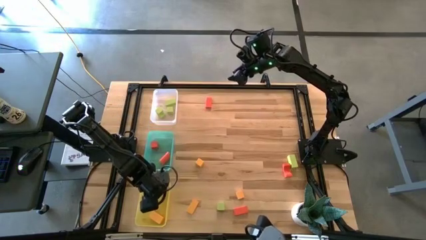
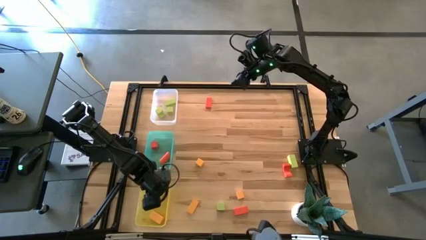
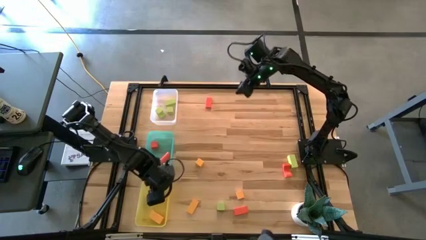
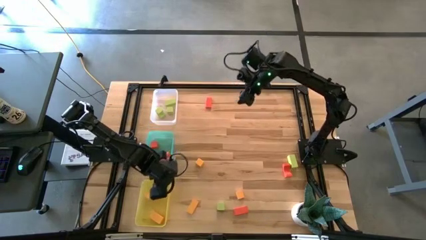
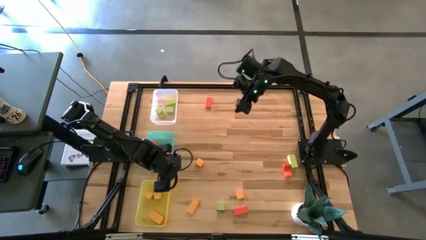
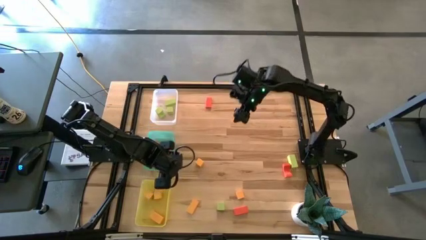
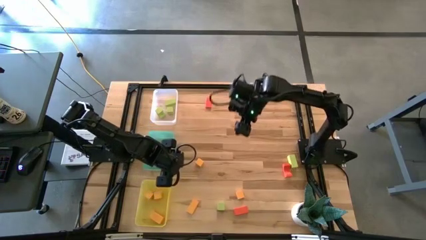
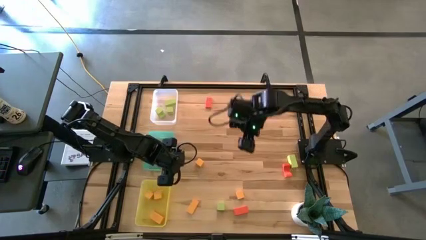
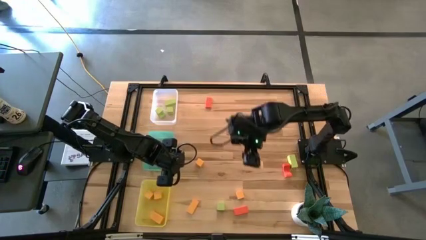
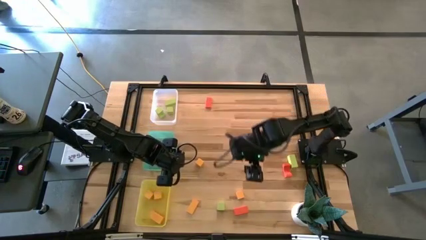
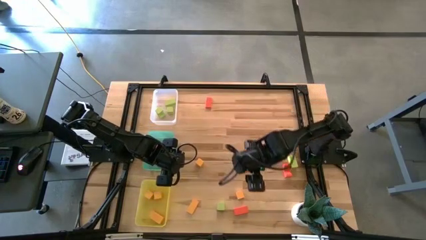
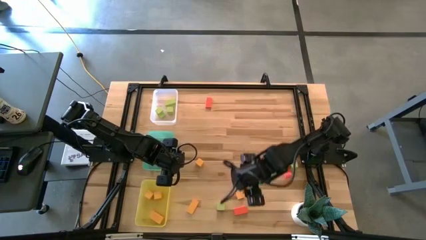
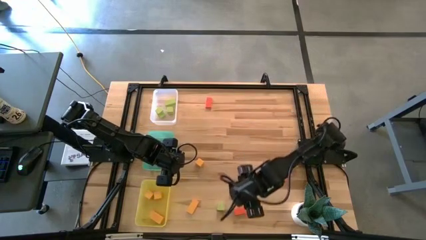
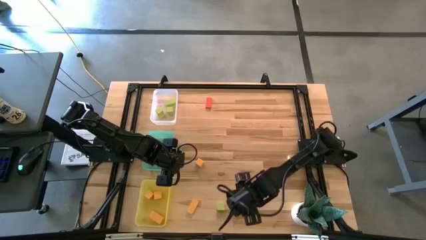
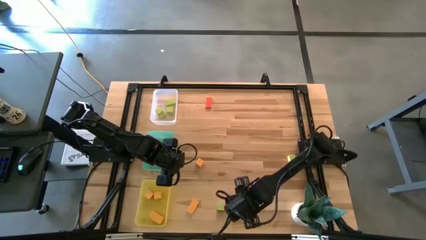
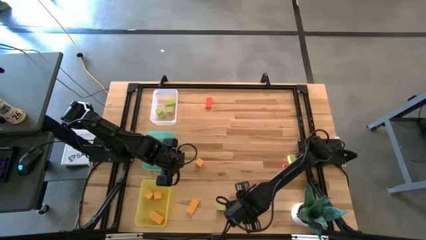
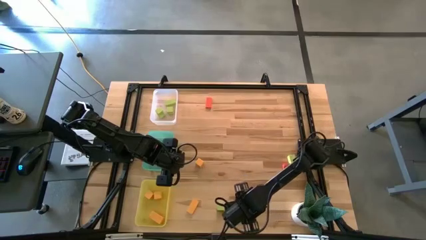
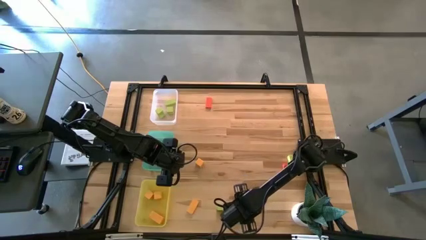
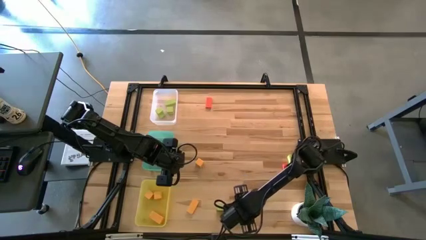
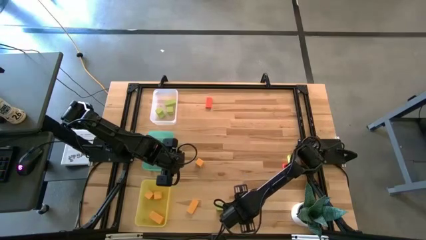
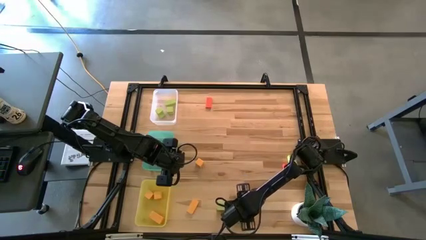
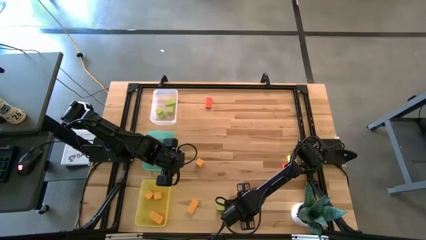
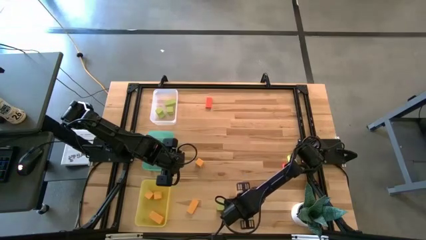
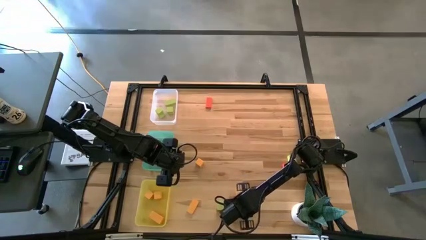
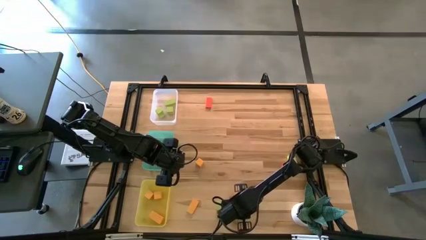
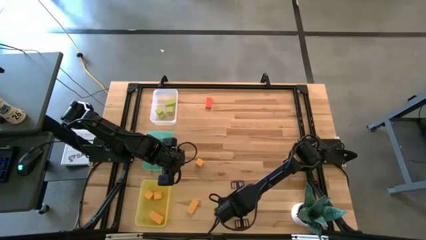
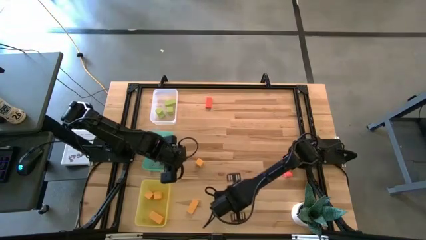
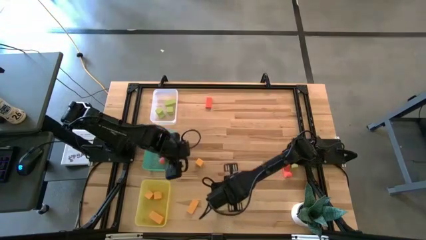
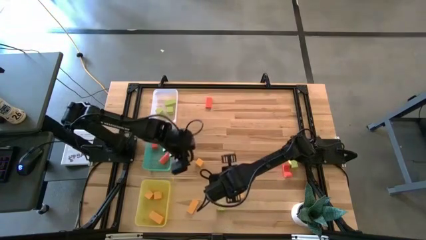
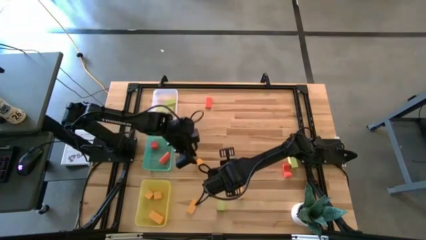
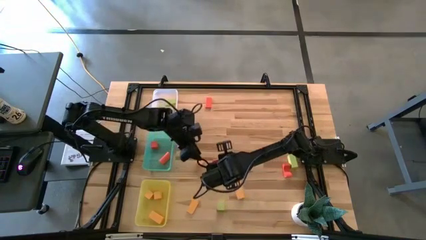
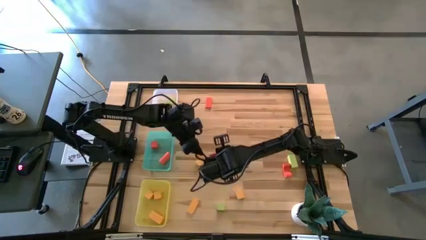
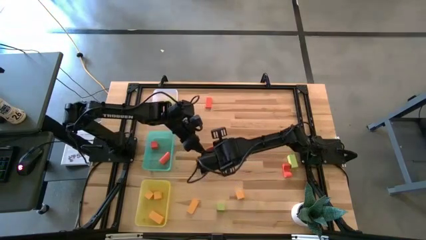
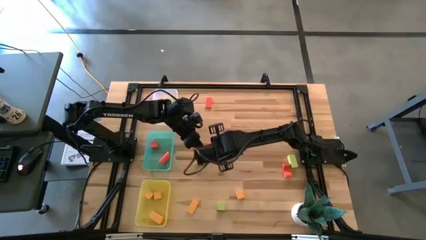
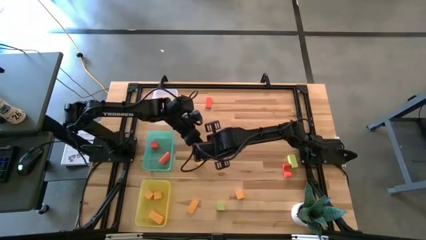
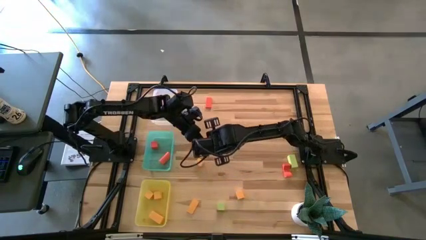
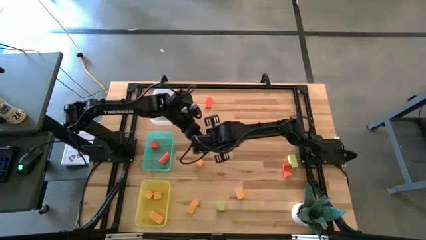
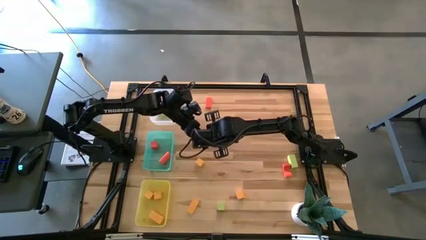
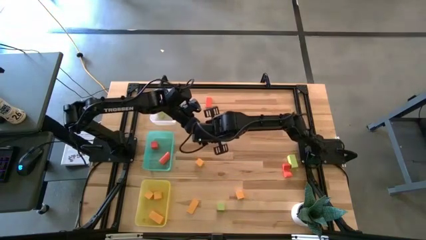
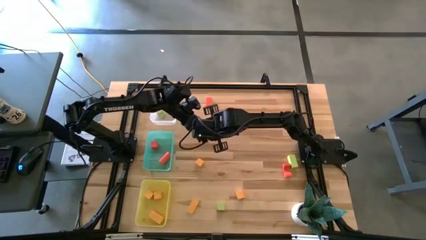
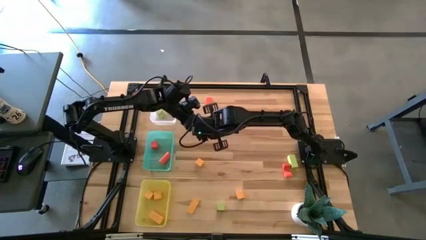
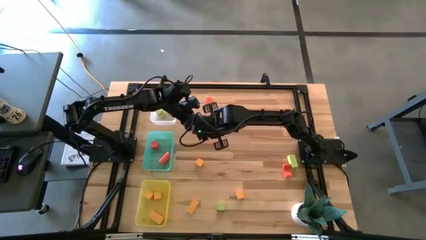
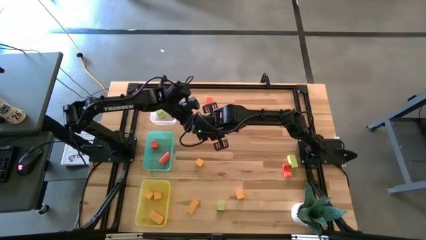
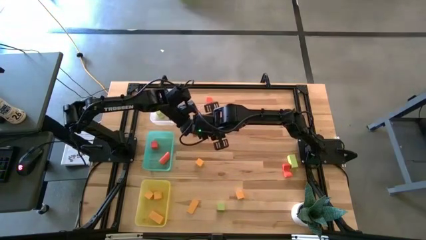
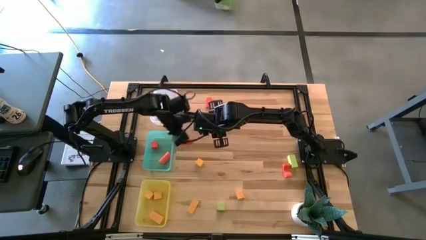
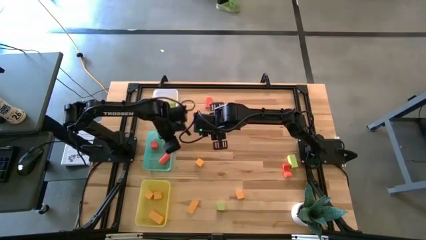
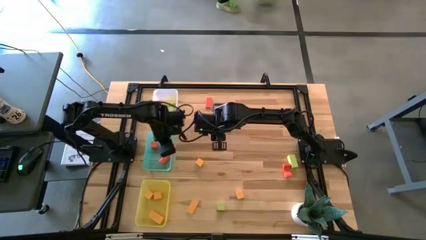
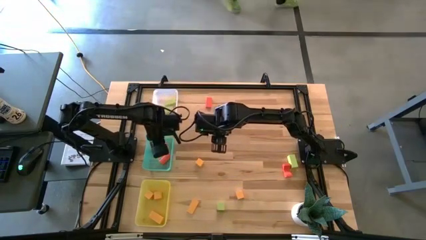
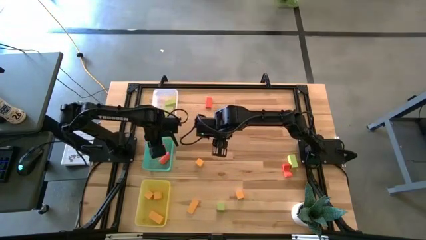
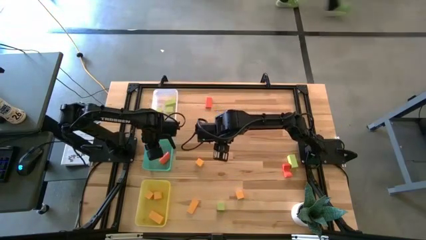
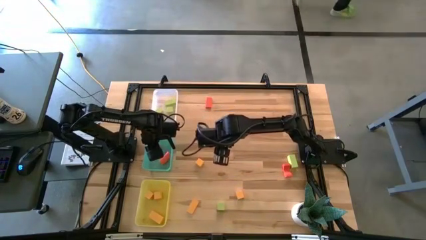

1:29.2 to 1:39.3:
Task: Sort & place blocks by color
Put the orange rectangular block into the blue bin

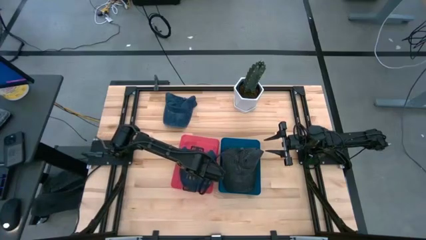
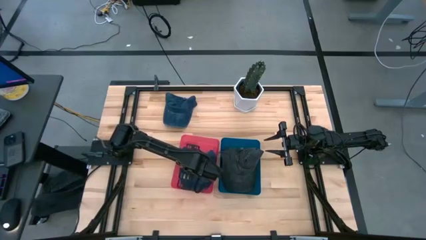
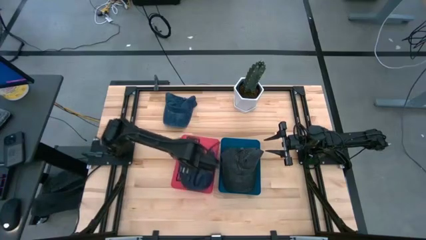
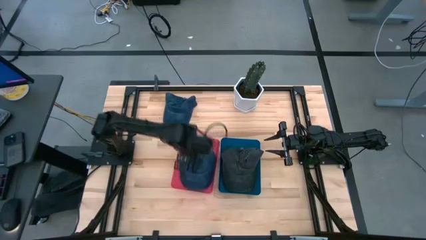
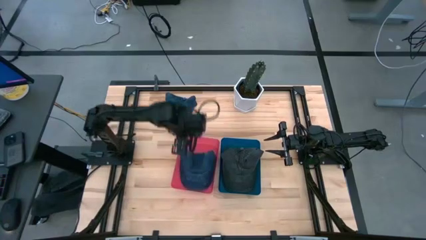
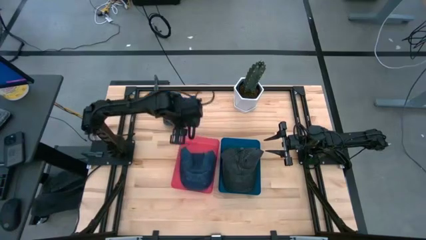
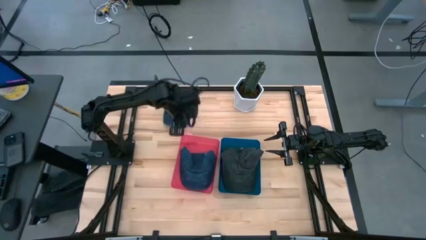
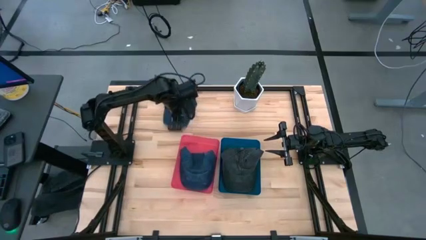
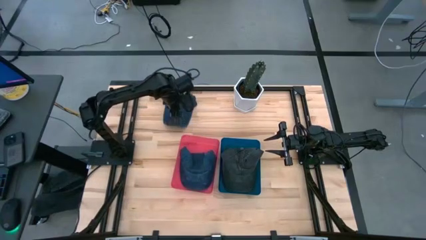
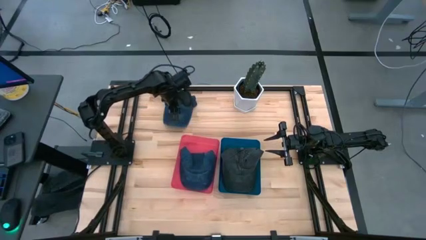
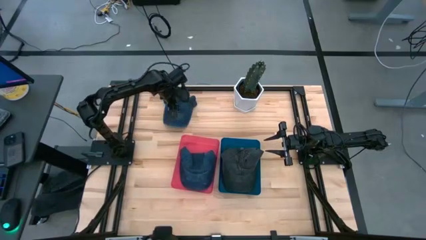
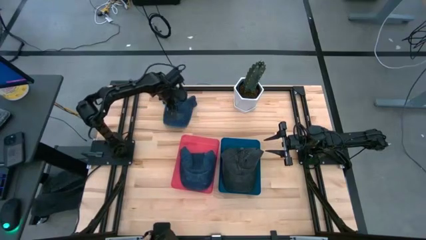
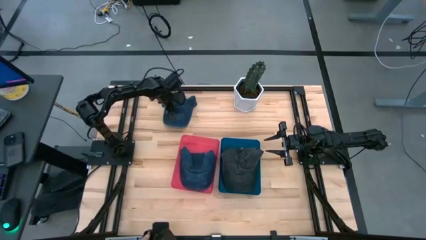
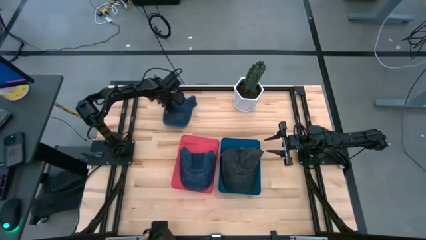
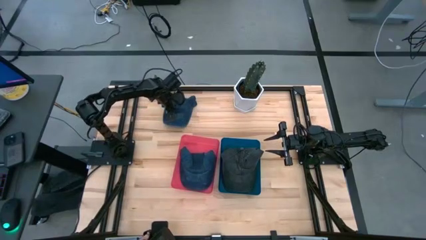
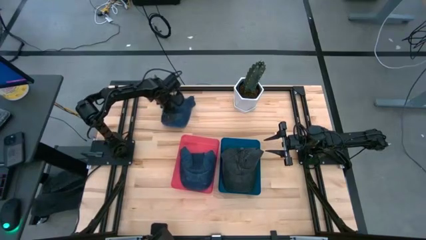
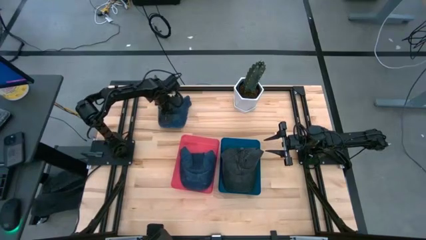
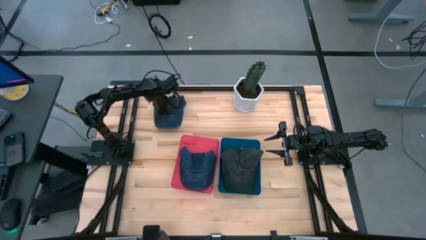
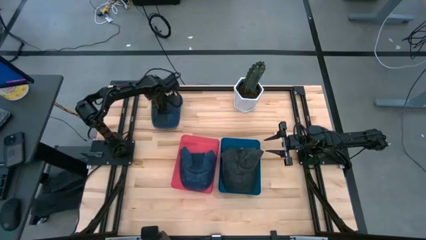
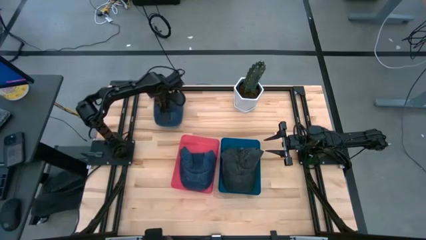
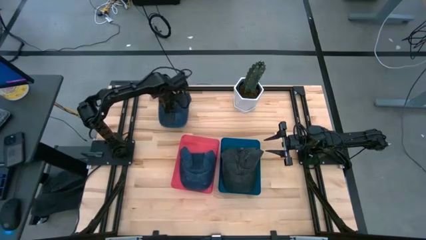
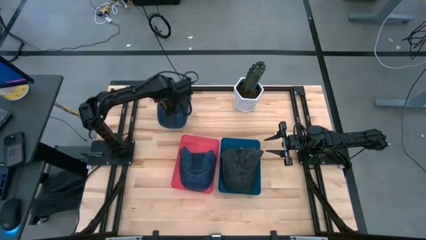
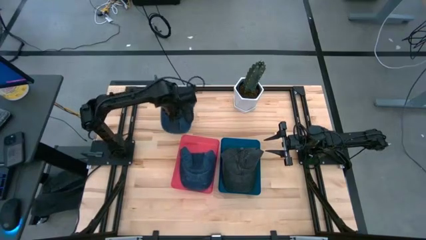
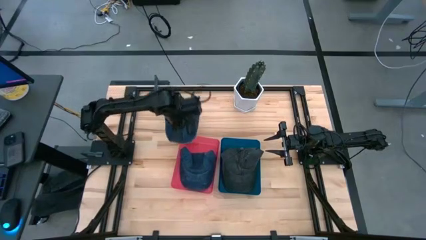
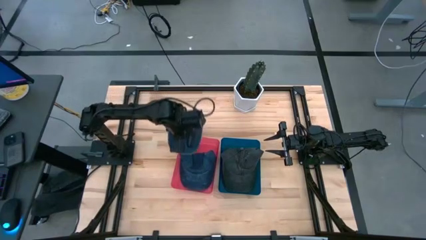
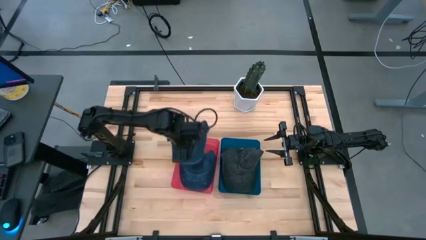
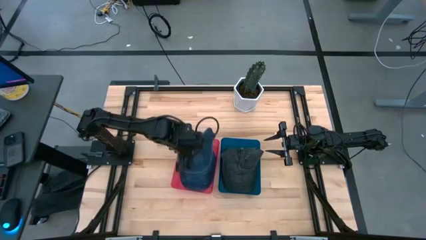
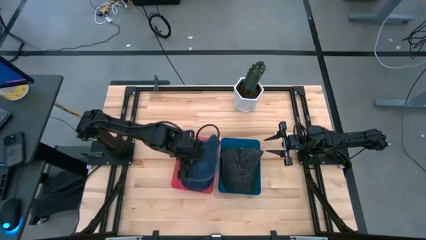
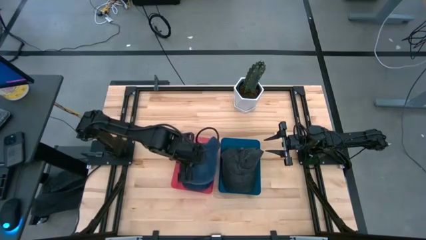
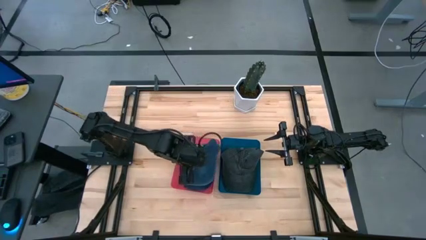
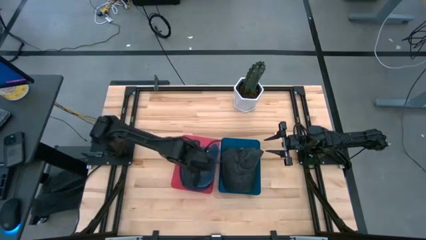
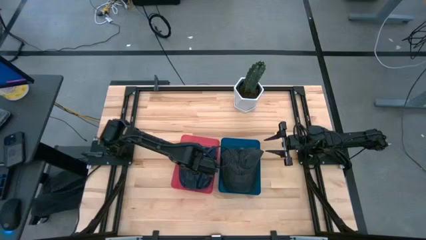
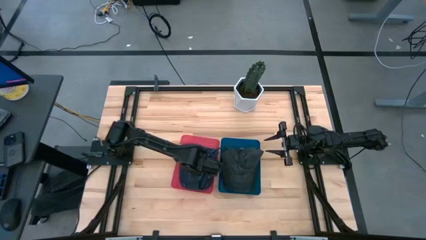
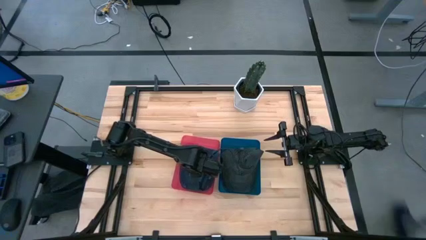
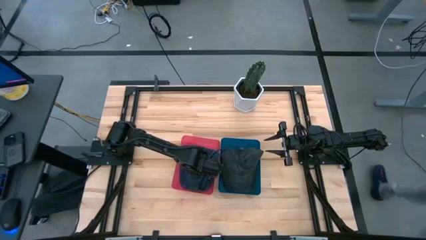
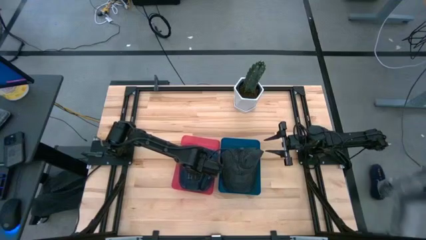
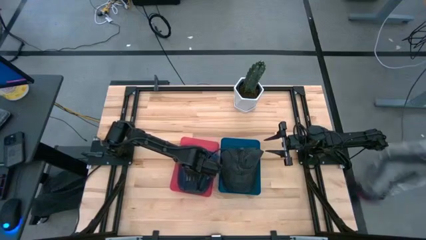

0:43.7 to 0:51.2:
Task: Pick & Place hat
Put the blue cap into the red bin
